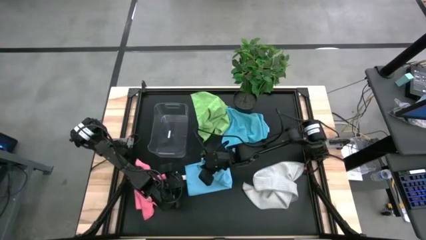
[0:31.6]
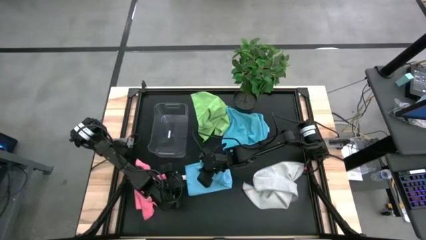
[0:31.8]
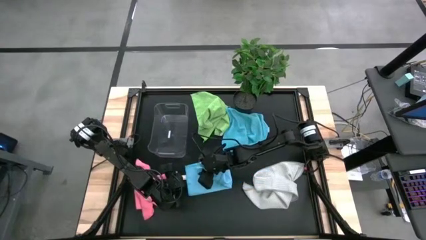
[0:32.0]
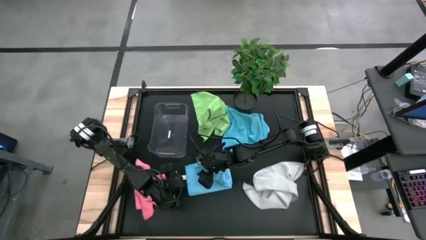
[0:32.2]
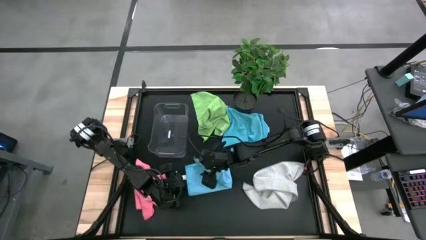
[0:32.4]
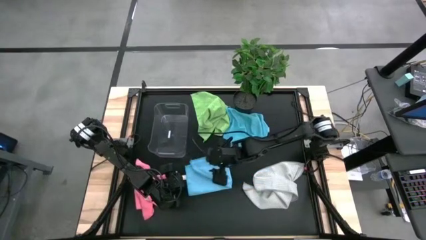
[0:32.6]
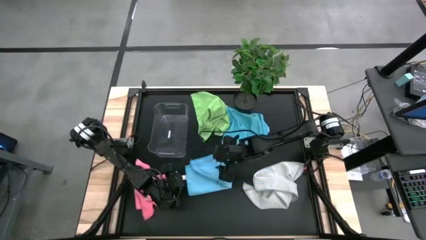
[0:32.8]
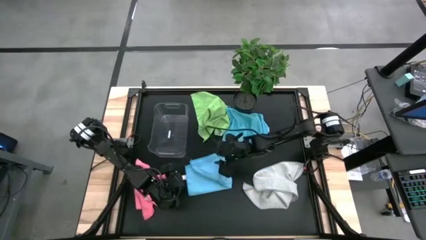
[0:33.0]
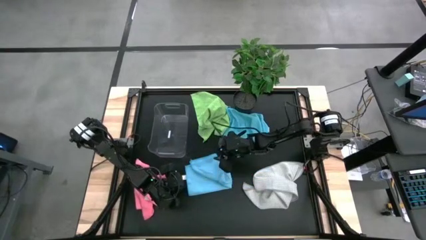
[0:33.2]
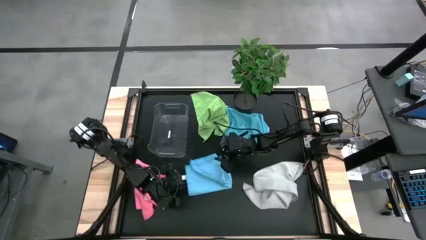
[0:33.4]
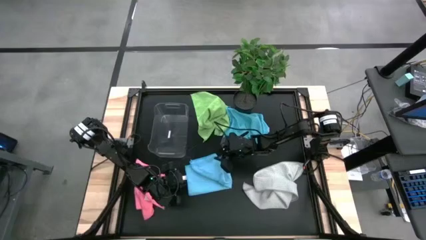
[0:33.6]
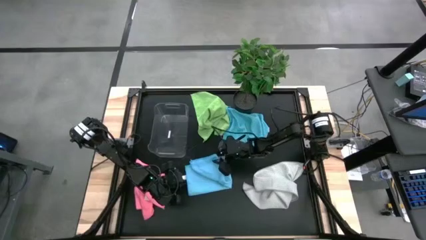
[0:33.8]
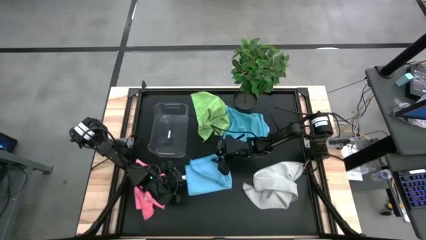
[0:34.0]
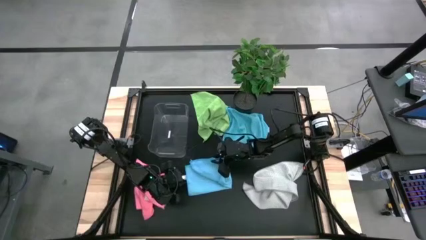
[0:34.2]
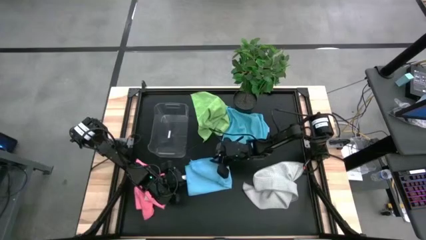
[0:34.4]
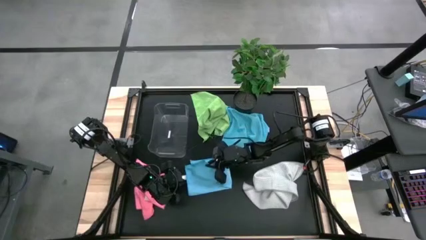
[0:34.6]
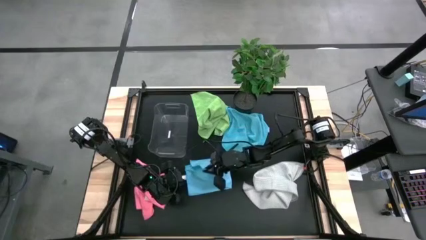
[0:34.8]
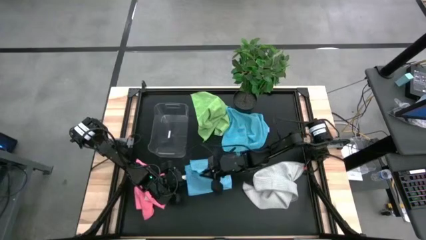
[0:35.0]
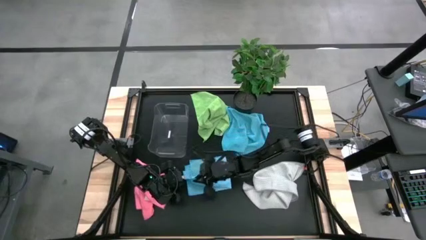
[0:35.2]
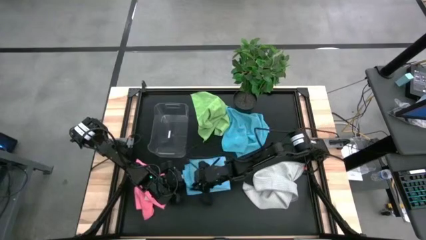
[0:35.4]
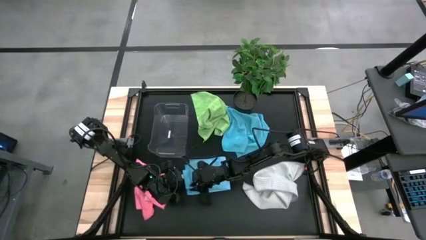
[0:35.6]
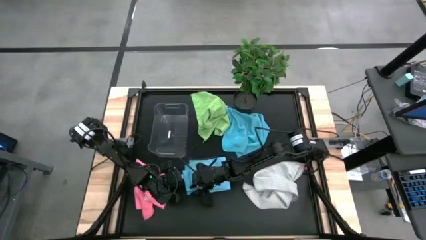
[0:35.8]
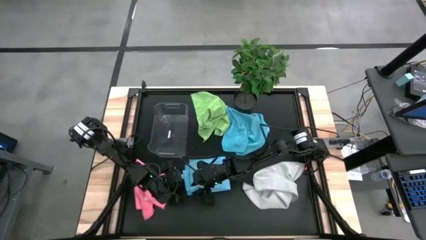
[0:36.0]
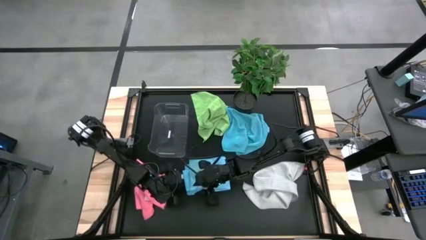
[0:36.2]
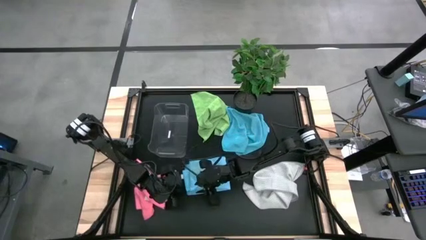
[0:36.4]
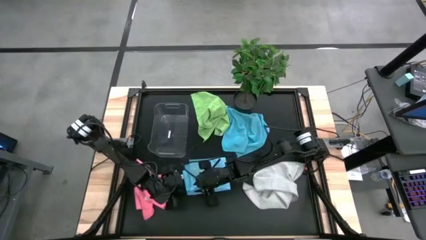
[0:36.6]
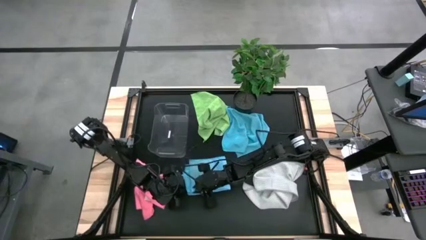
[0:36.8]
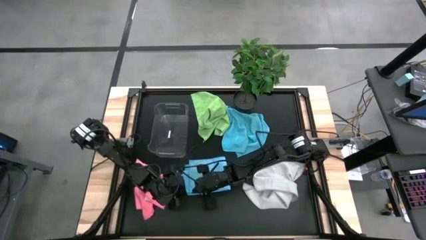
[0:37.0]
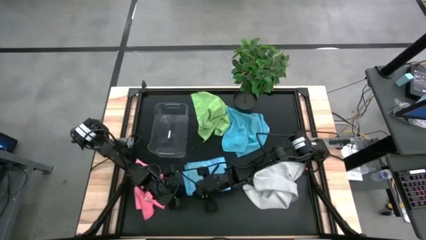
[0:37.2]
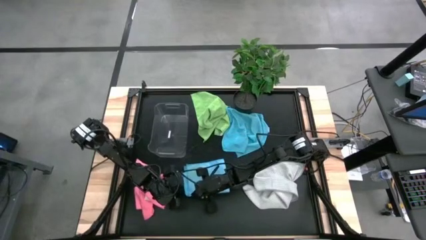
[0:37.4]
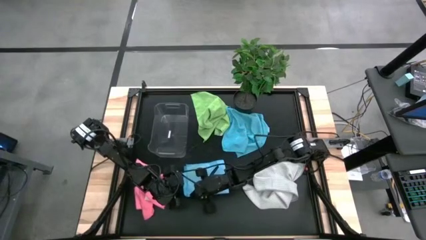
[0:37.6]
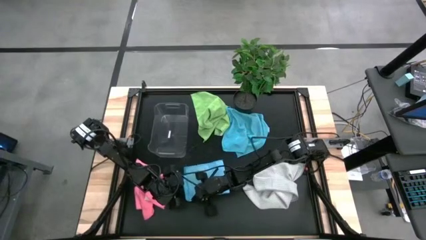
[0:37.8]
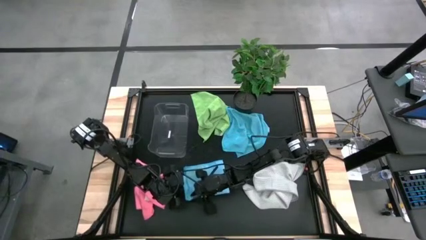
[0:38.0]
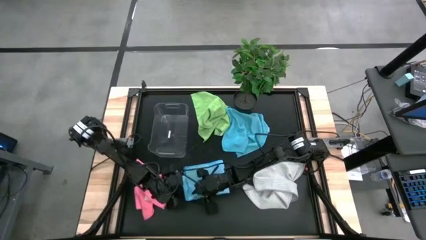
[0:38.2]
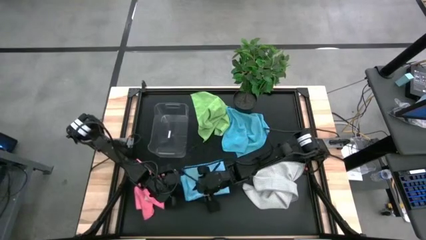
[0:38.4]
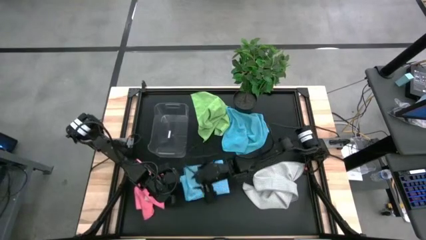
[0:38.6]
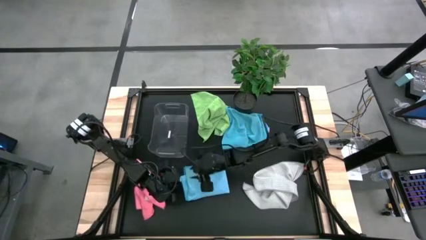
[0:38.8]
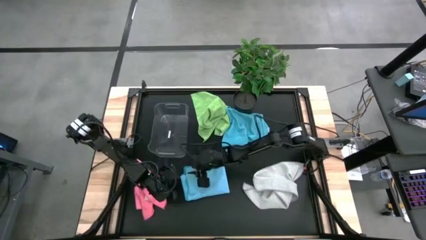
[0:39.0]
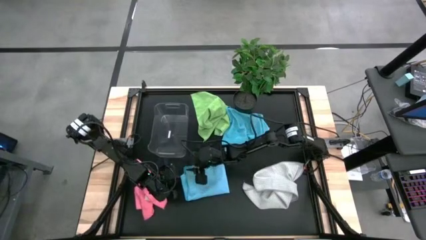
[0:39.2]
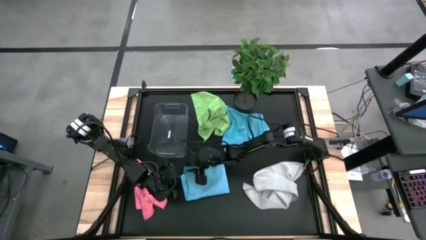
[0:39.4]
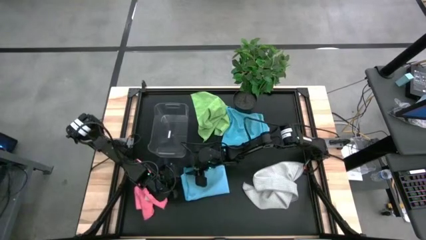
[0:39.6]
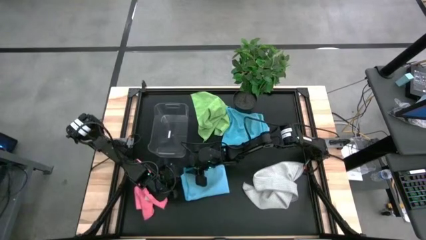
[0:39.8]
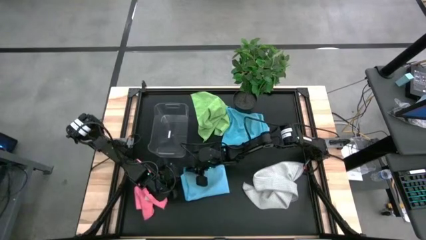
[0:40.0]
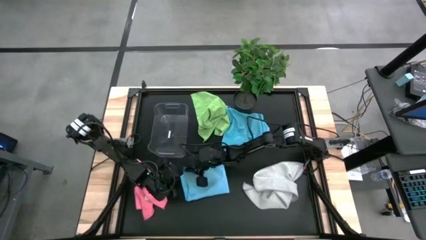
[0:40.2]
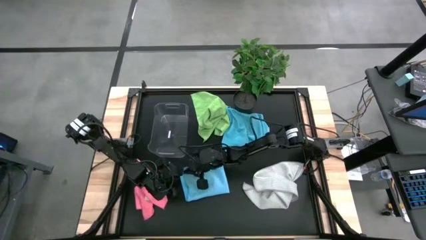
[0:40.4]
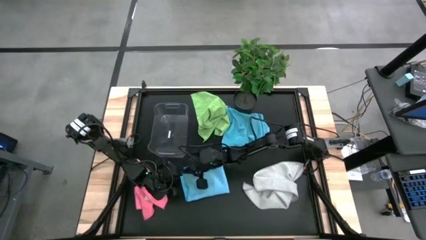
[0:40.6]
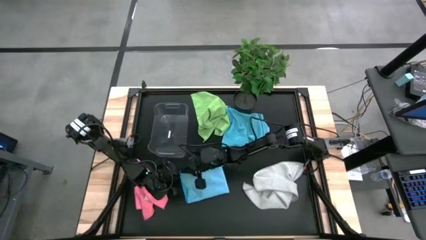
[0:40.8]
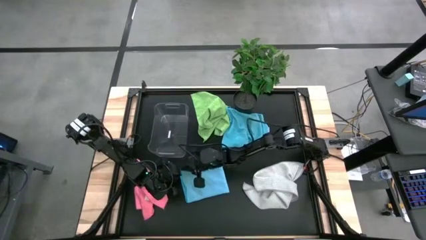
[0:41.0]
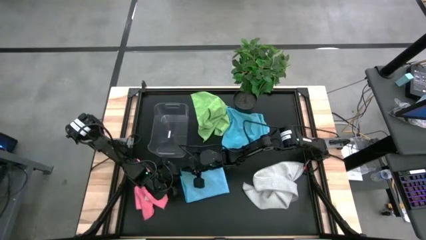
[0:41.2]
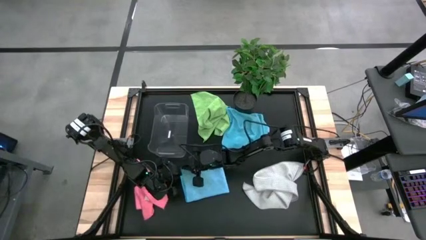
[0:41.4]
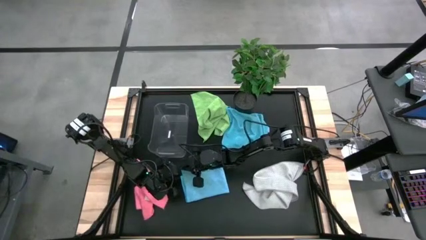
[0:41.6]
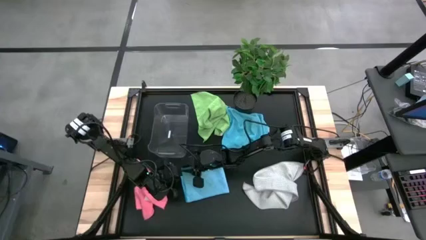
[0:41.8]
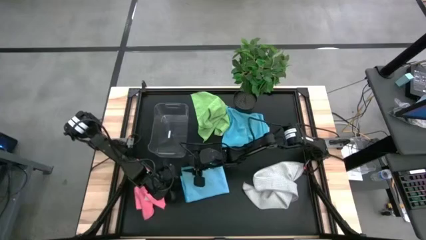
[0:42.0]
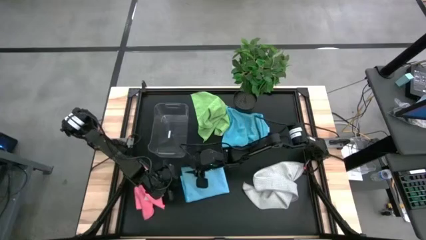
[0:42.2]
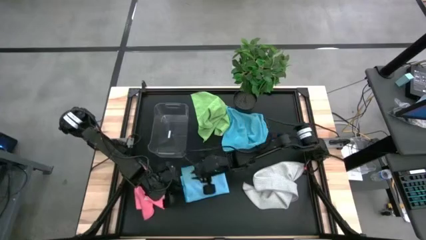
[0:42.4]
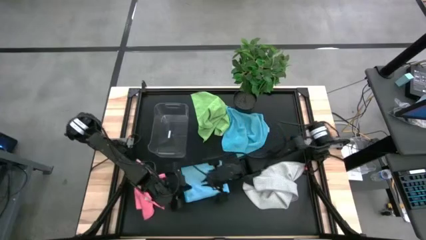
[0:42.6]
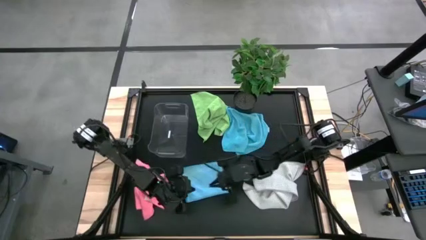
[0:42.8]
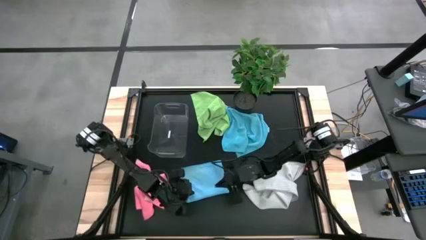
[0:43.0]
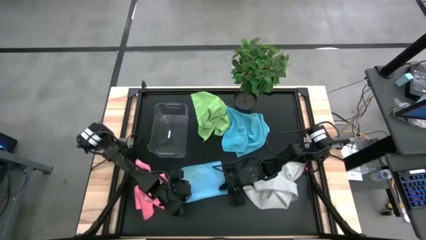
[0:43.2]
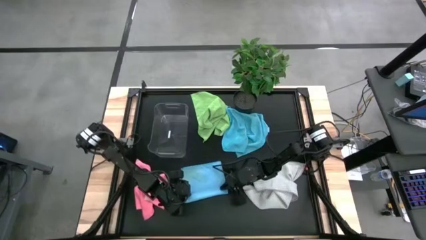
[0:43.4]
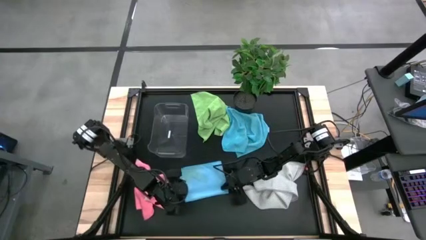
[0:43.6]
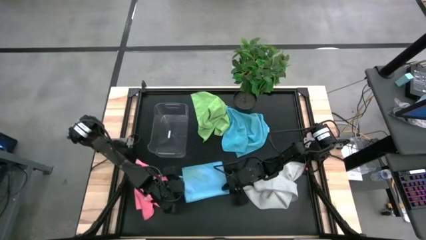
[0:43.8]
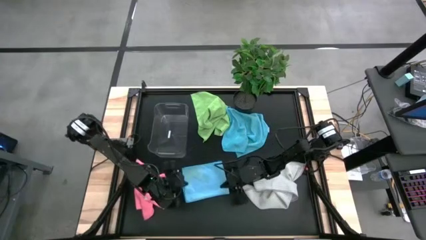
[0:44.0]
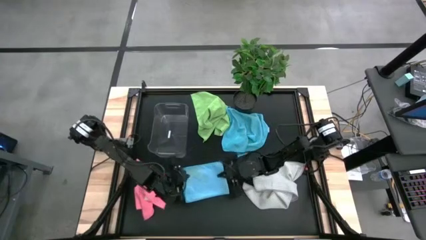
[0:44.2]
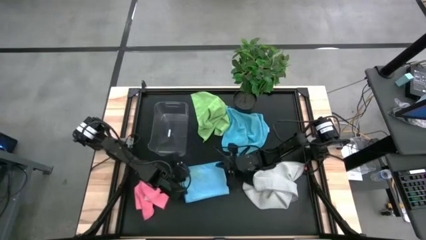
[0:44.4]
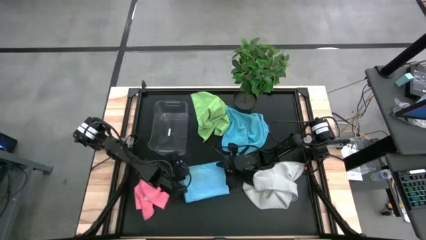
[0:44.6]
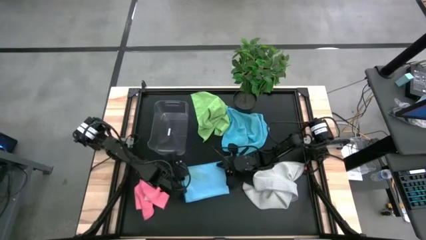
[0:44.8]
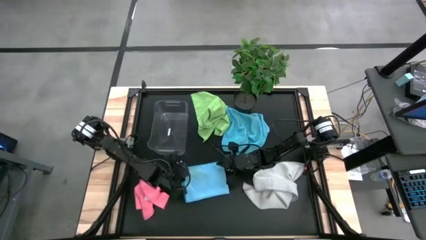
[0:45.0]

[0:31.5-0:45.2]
Task: Fold microfiber towels
Fold the bottom blue microfiber towel
